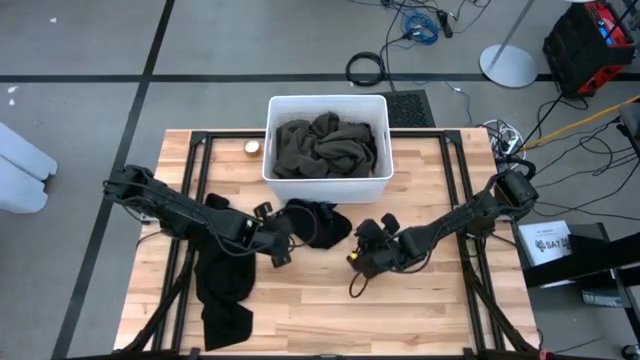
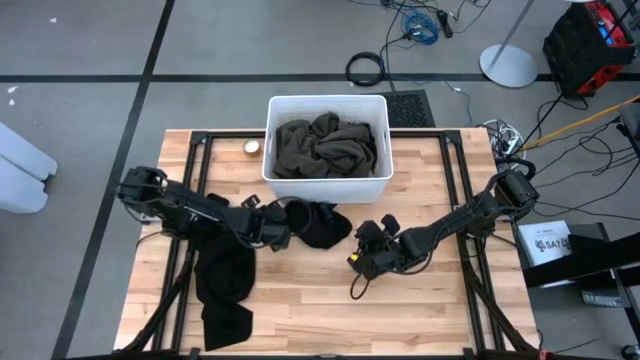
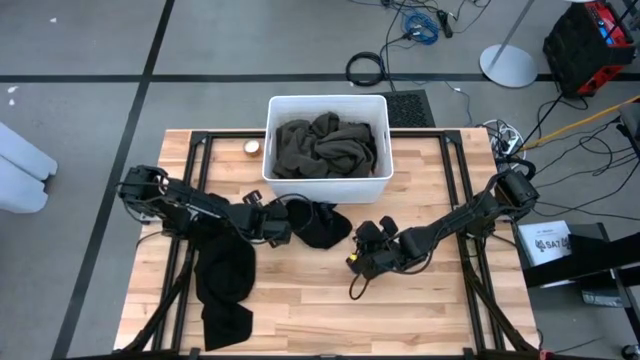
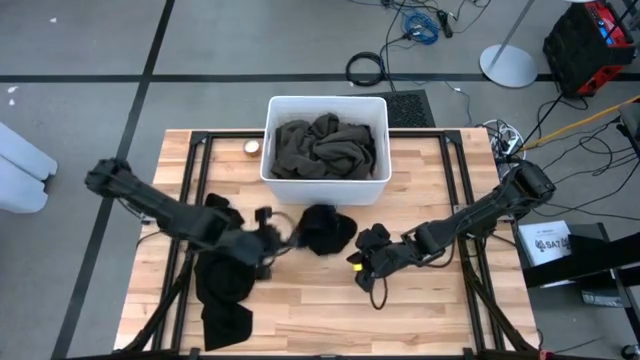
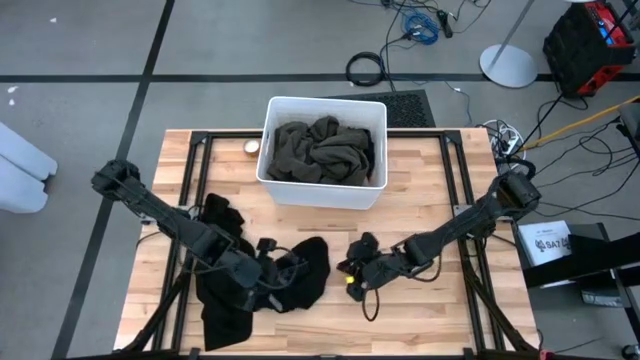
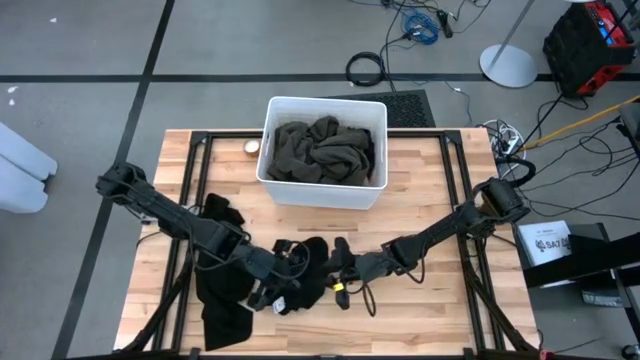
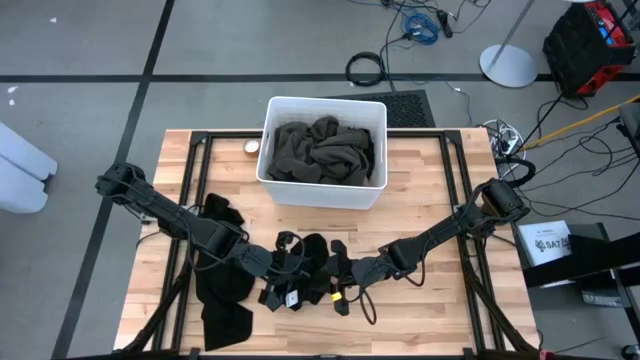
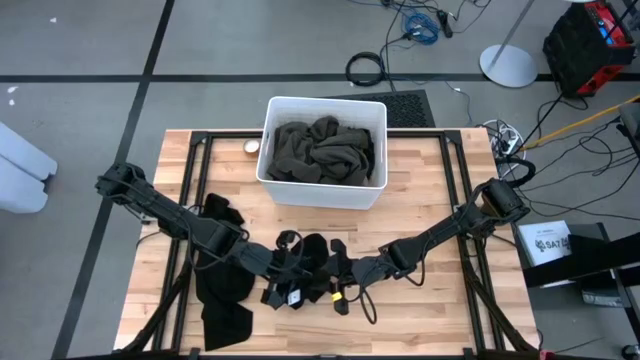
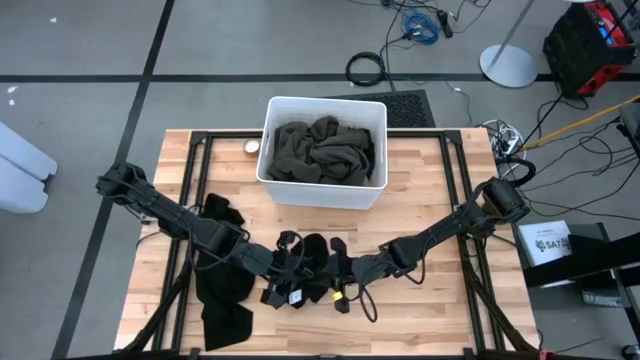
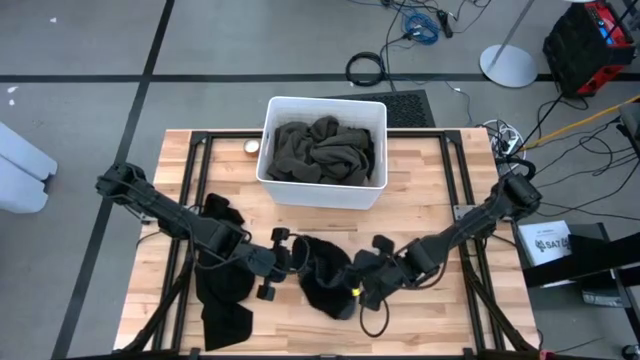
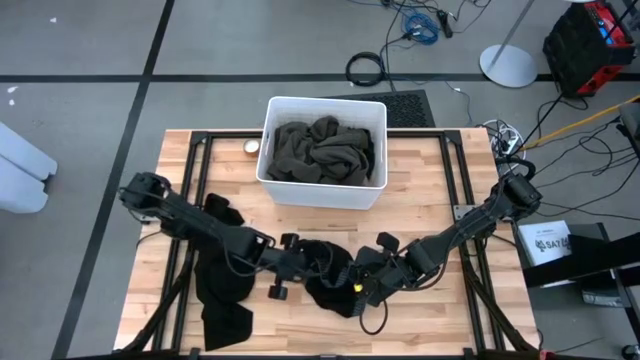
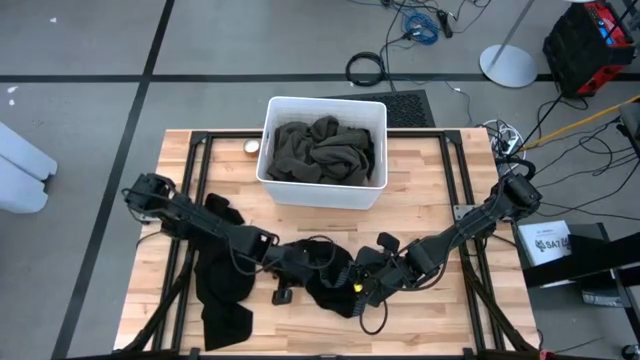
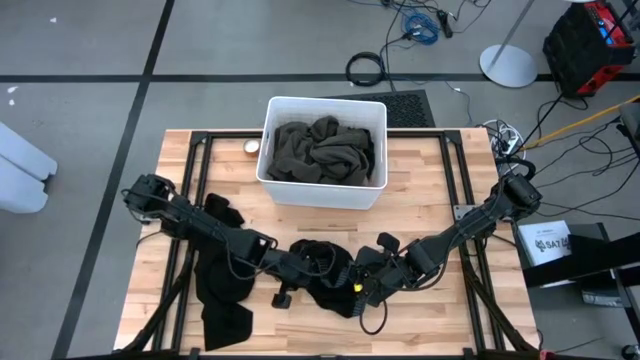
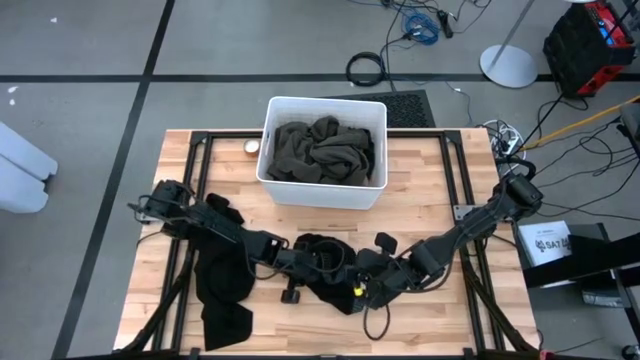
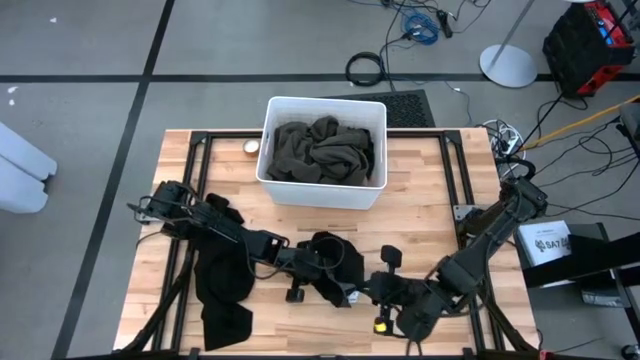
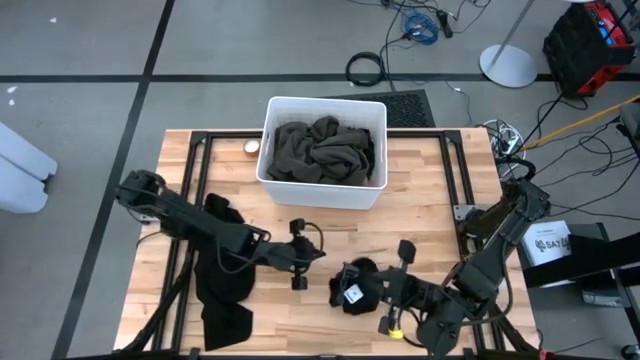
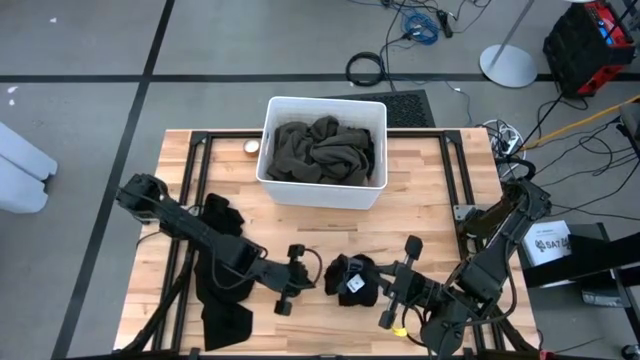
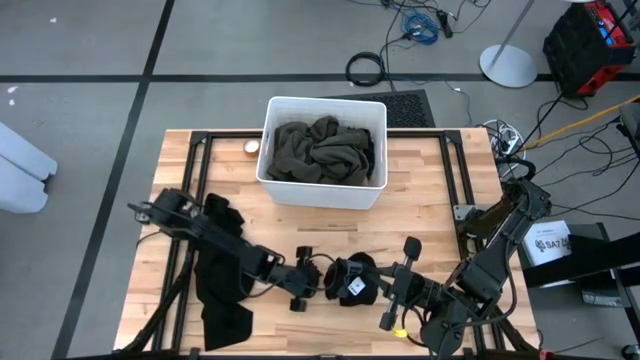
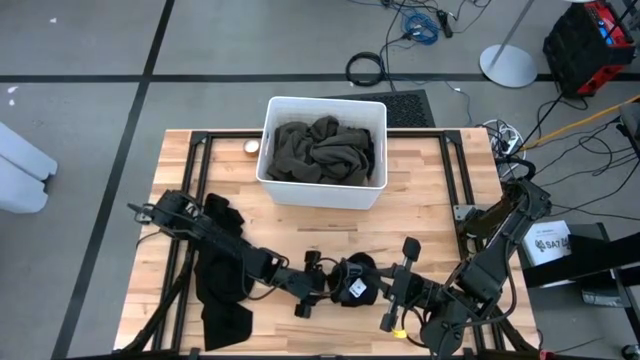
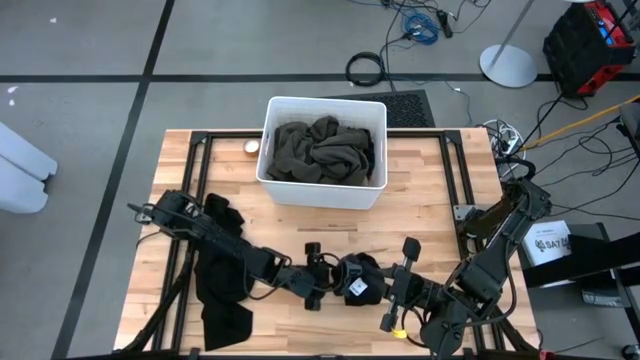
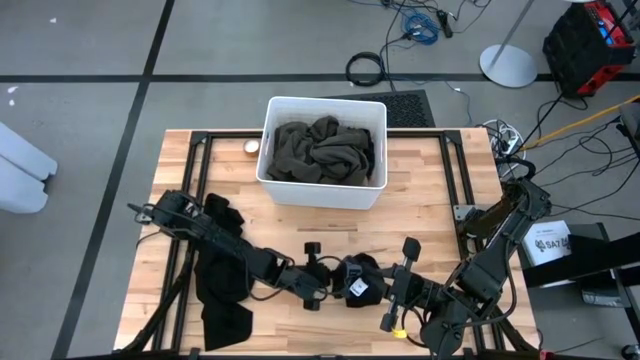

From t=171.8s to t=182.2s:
Task: Fold laundry
Fold the black underwear

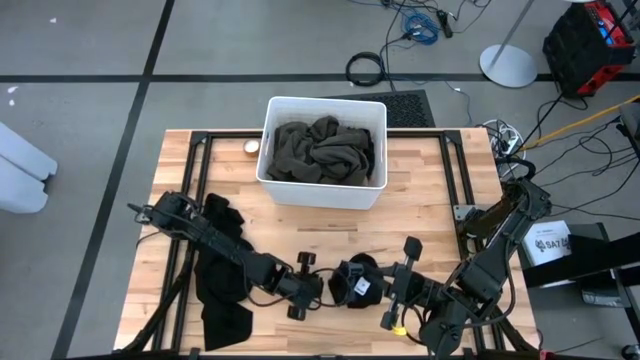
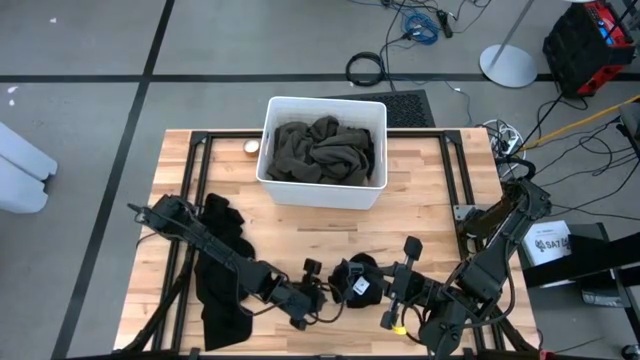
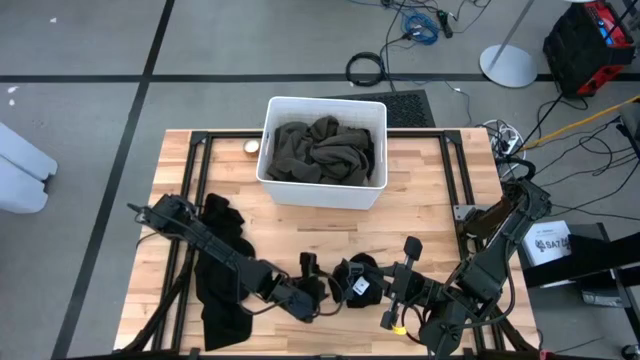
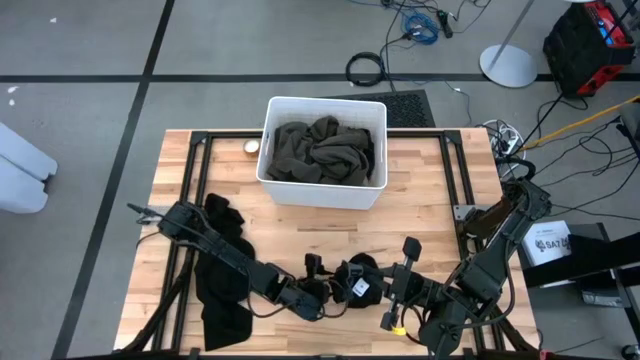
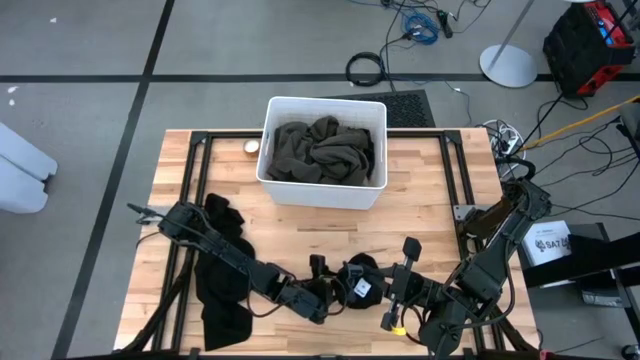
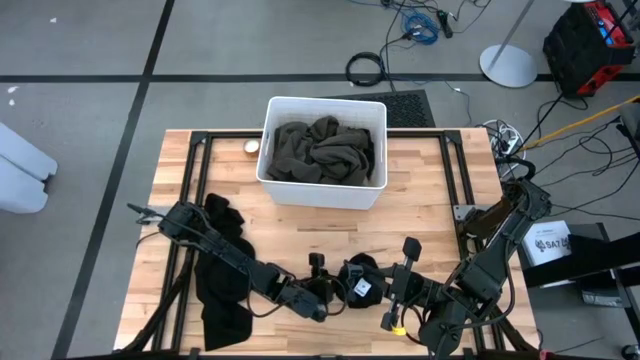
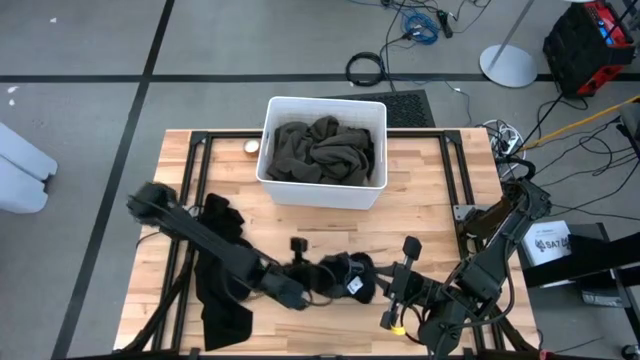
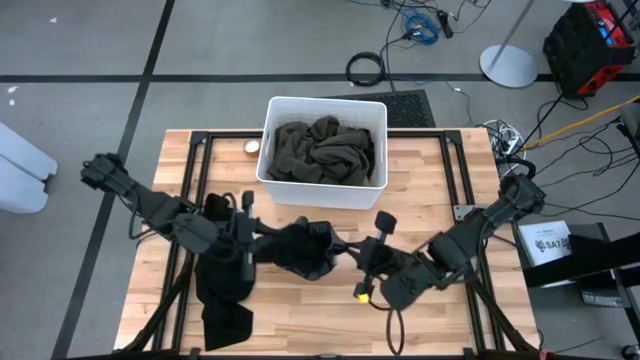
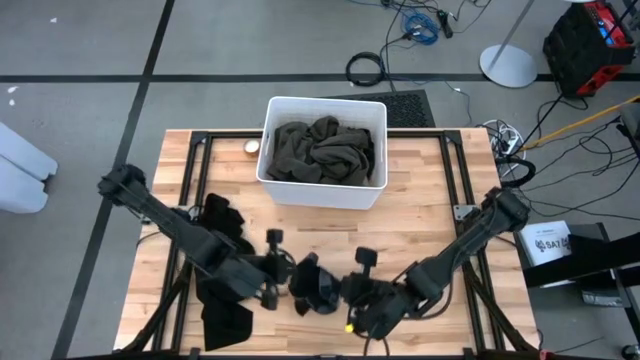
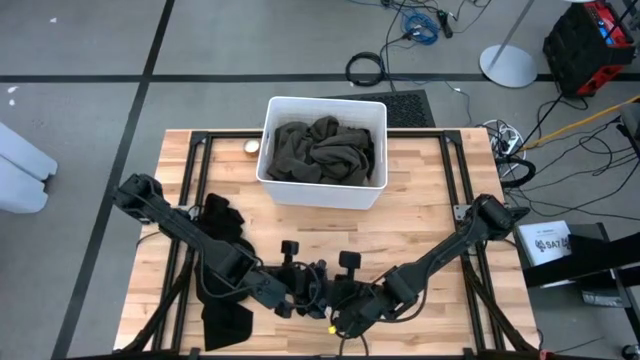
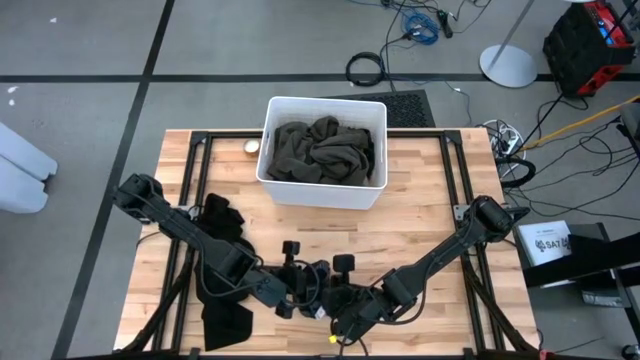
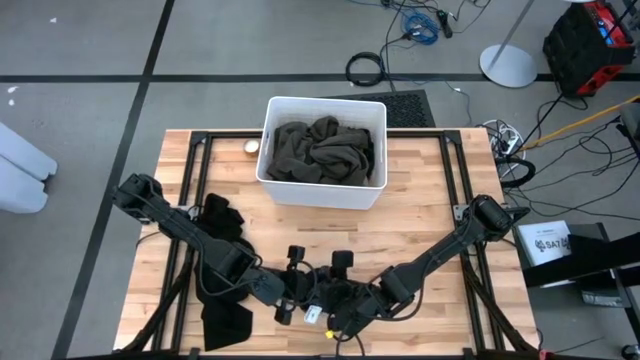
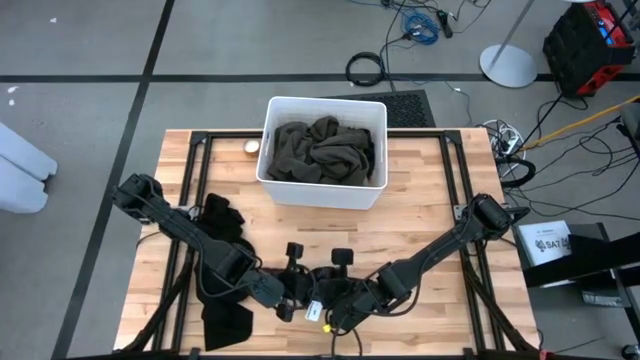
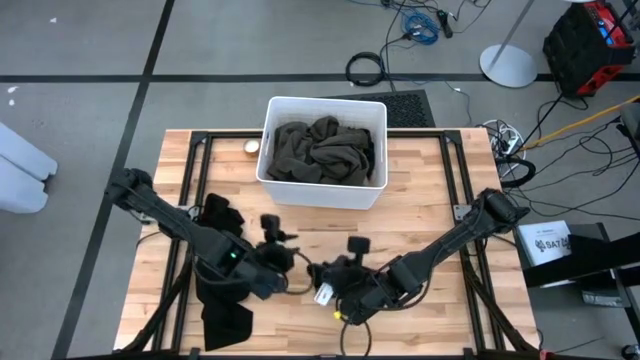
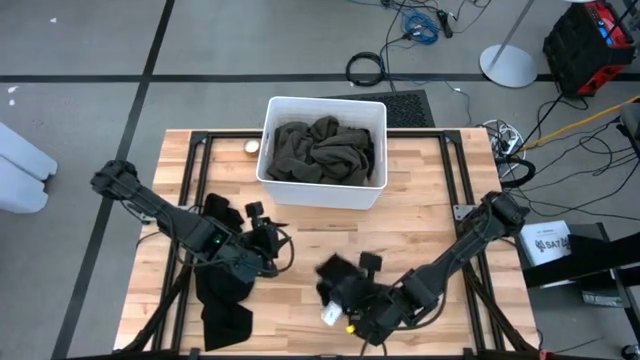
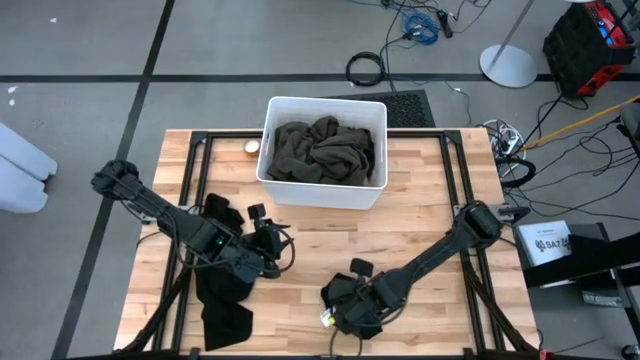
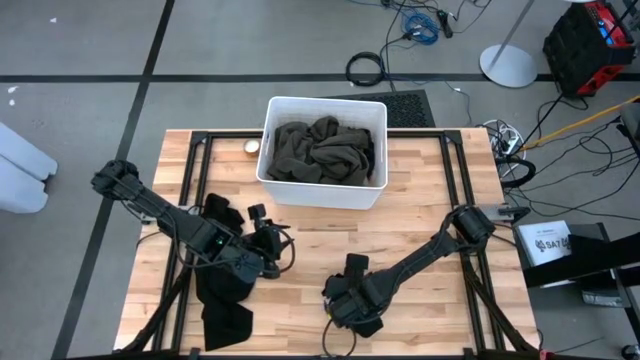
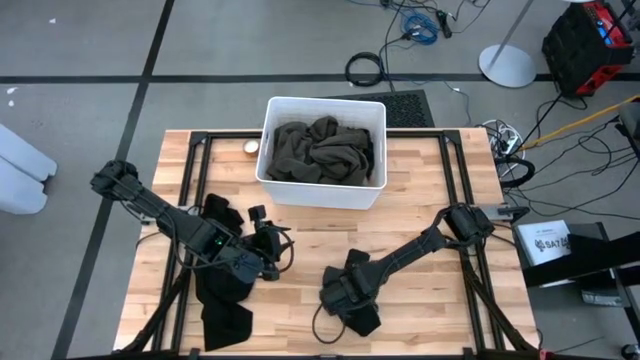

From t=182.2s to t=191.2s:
Fold the black underwear

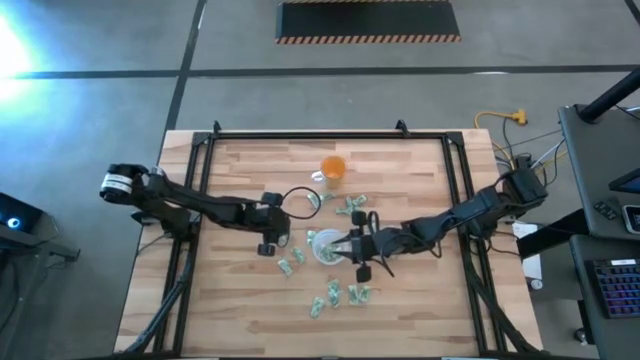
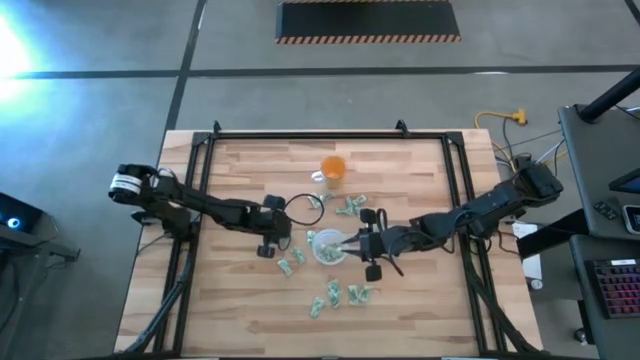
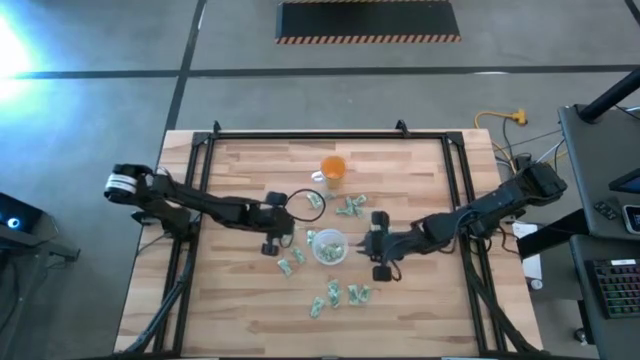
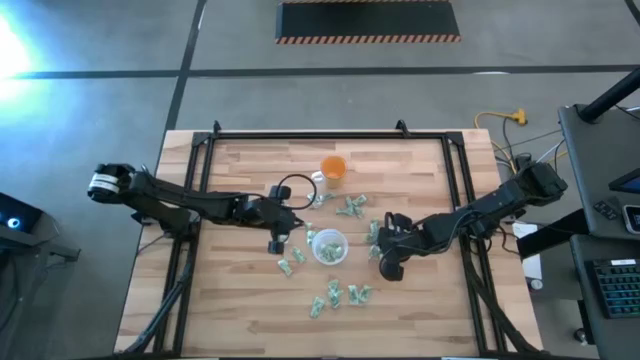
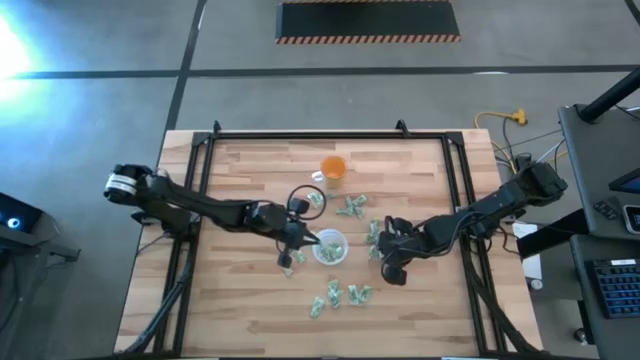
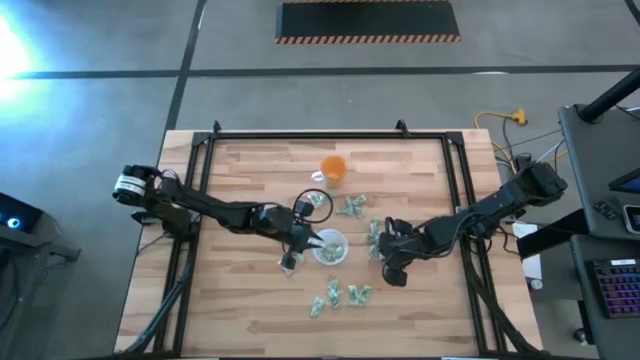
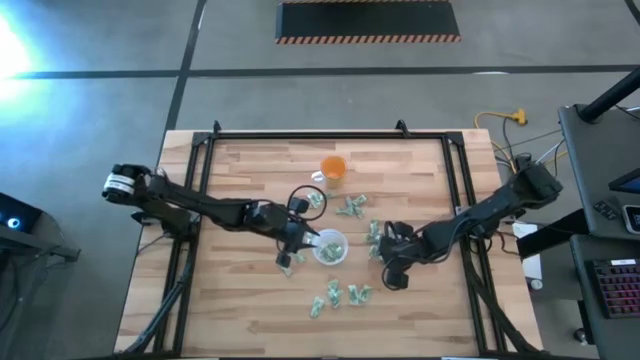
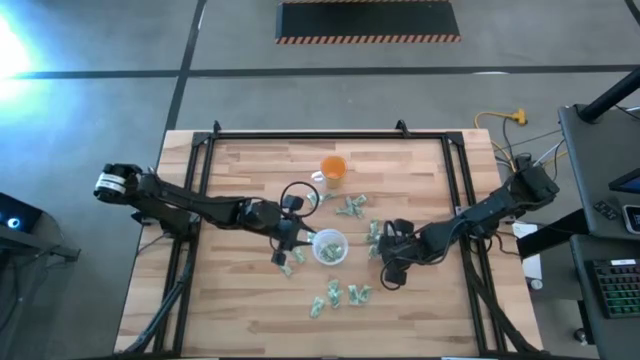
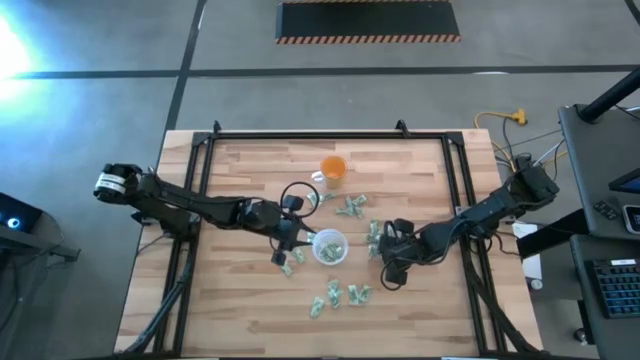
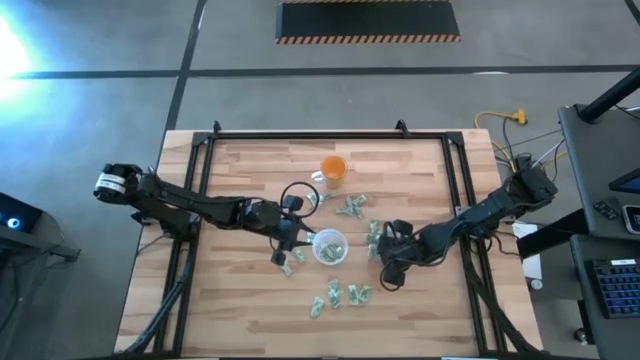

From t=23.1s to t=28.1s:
Task: Pick and place Stevia / Truvia into bins
Put the green stevia packet into the transparent container
